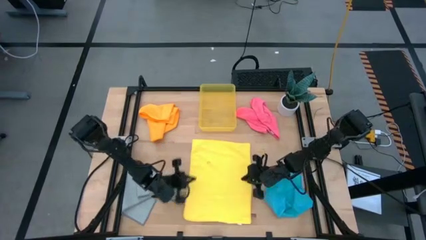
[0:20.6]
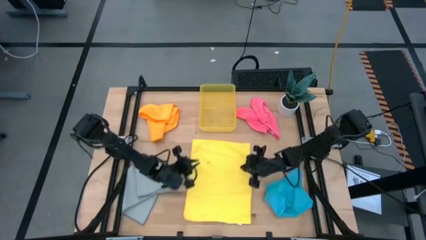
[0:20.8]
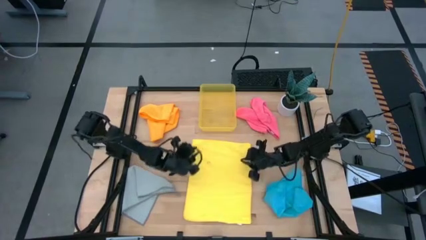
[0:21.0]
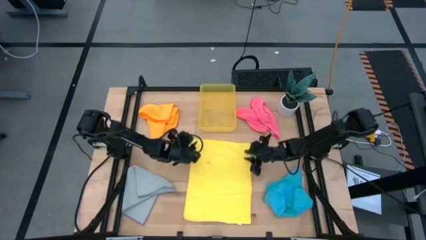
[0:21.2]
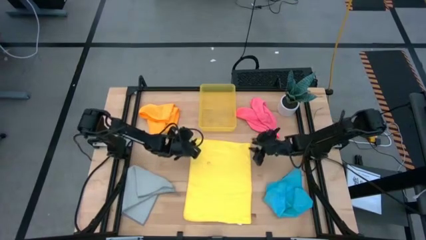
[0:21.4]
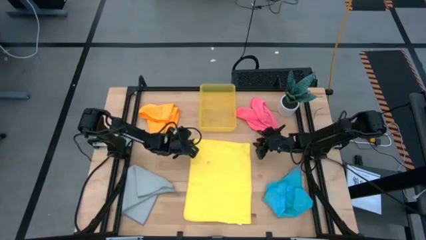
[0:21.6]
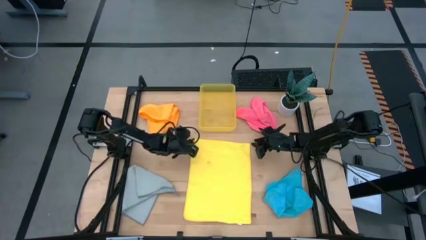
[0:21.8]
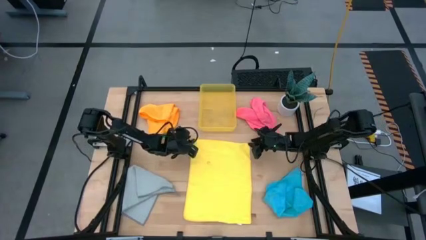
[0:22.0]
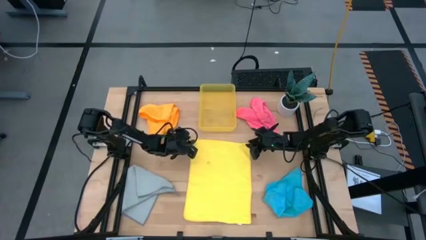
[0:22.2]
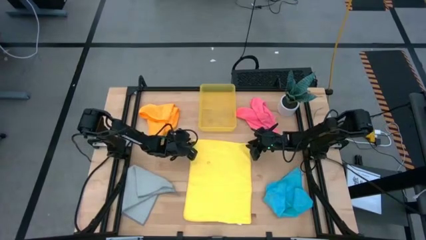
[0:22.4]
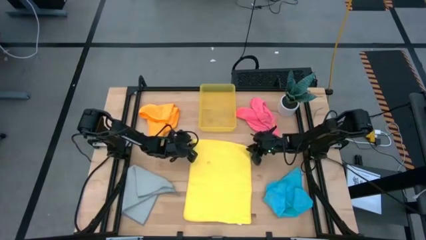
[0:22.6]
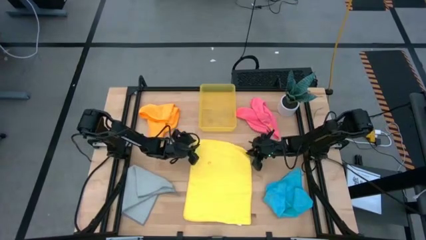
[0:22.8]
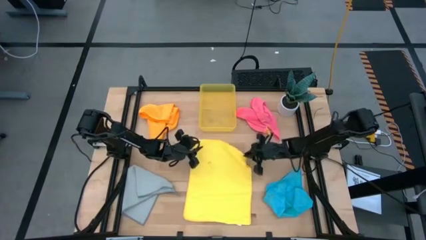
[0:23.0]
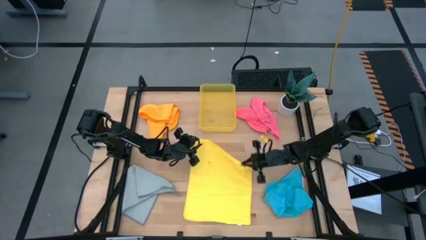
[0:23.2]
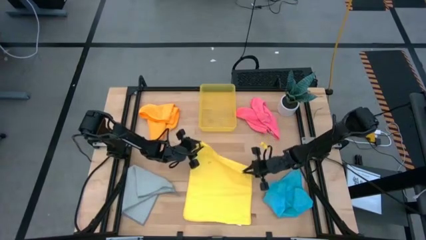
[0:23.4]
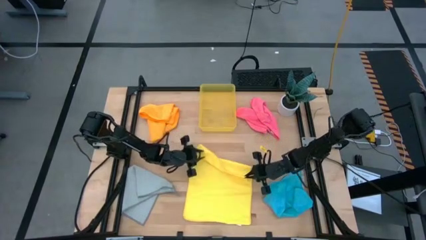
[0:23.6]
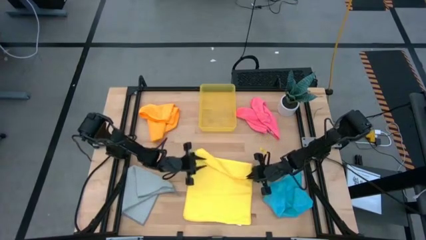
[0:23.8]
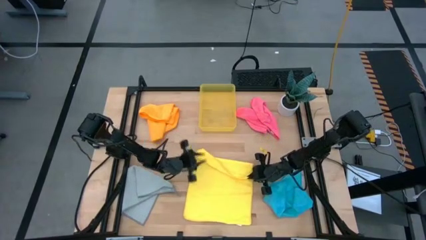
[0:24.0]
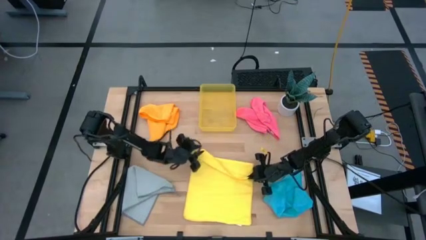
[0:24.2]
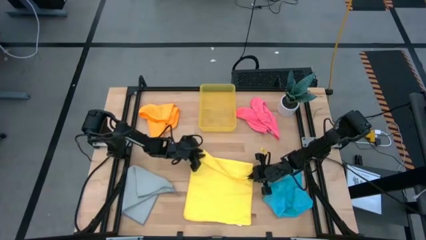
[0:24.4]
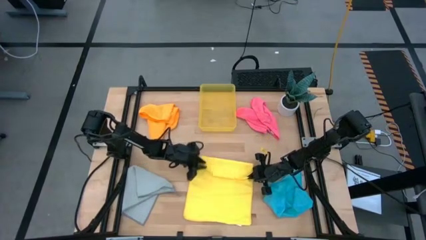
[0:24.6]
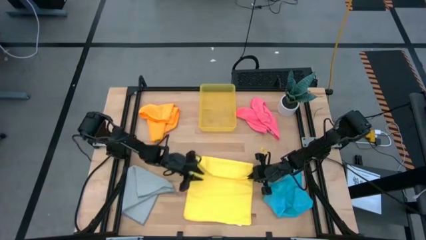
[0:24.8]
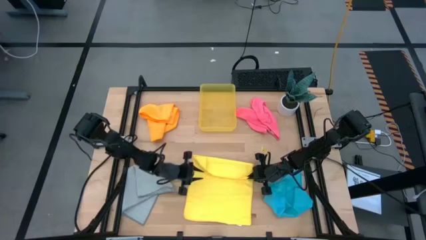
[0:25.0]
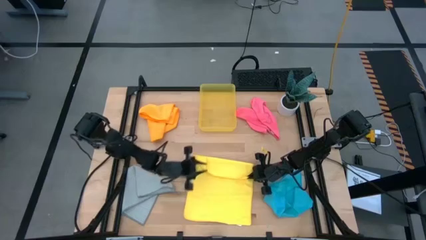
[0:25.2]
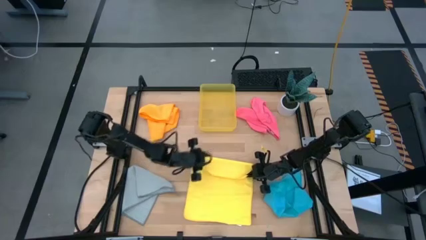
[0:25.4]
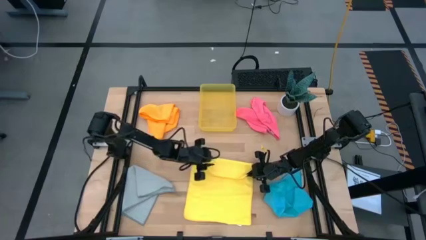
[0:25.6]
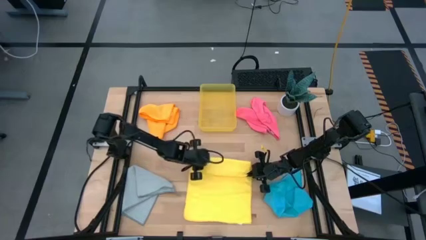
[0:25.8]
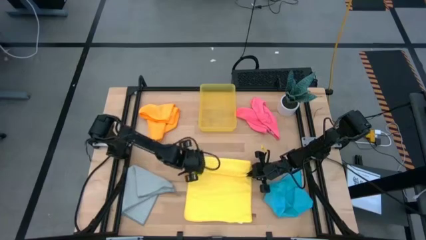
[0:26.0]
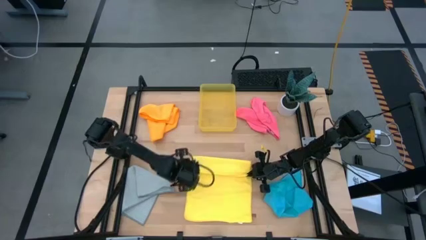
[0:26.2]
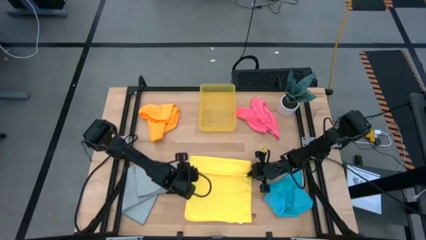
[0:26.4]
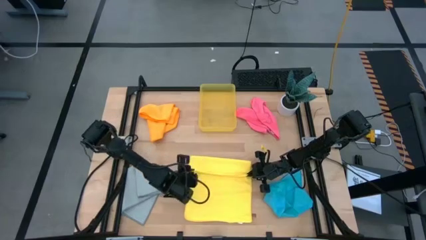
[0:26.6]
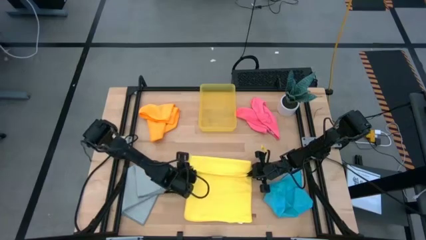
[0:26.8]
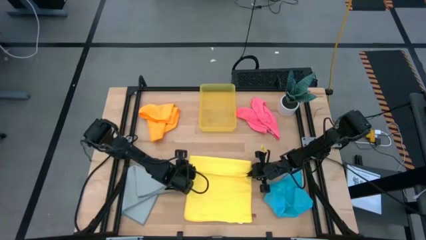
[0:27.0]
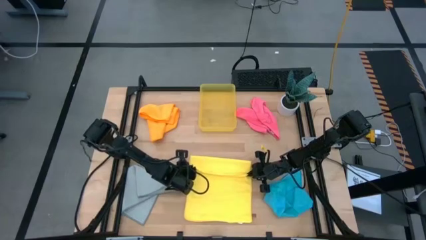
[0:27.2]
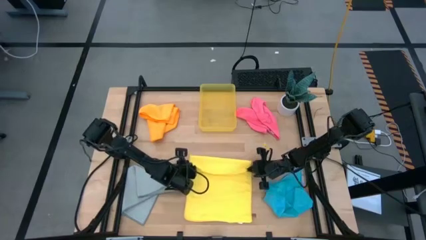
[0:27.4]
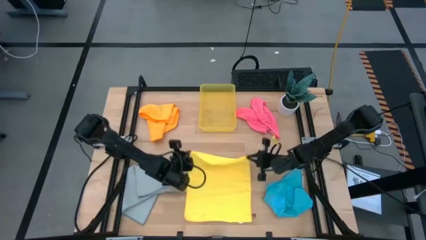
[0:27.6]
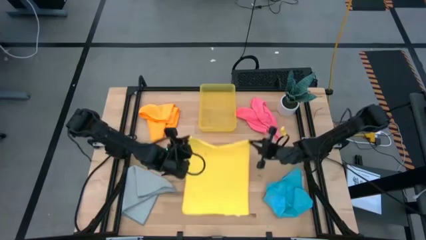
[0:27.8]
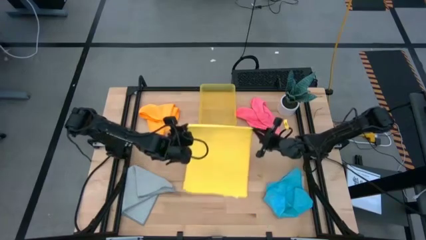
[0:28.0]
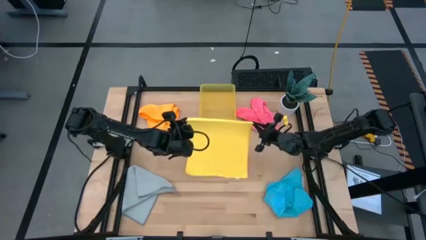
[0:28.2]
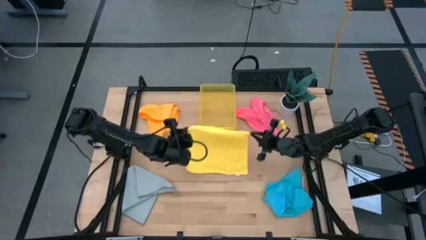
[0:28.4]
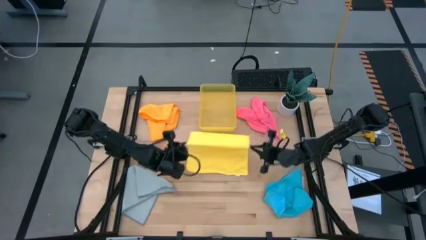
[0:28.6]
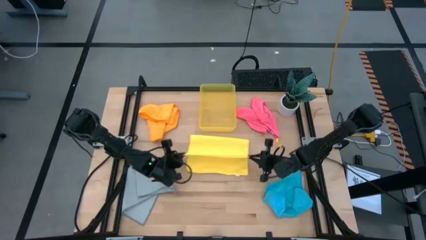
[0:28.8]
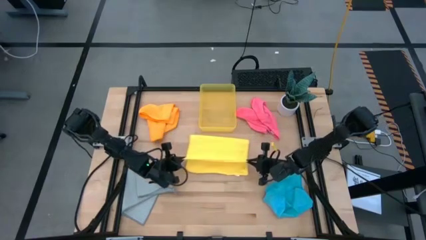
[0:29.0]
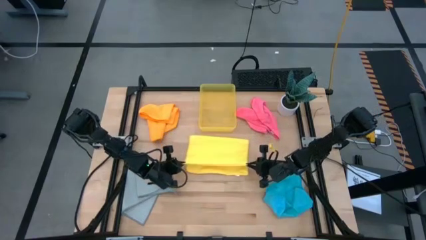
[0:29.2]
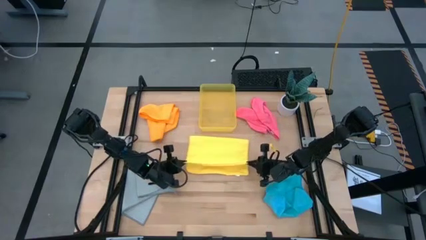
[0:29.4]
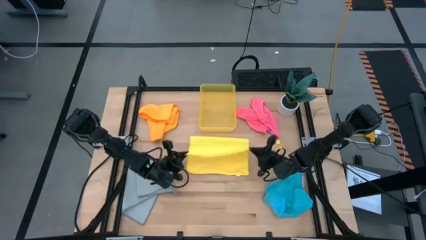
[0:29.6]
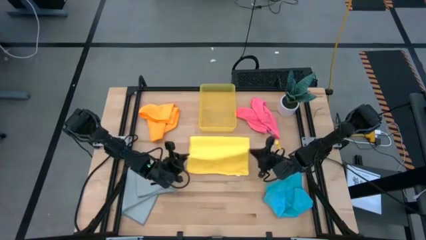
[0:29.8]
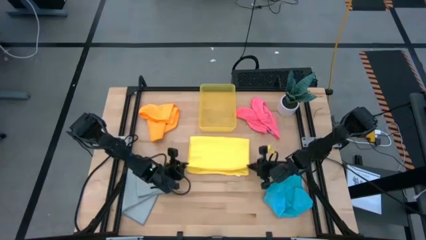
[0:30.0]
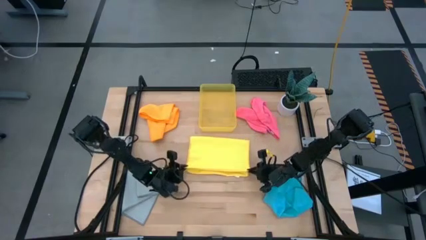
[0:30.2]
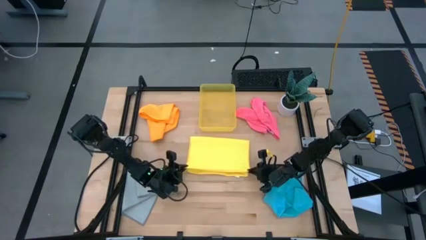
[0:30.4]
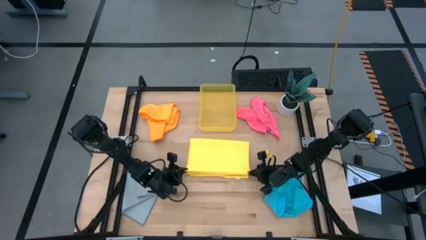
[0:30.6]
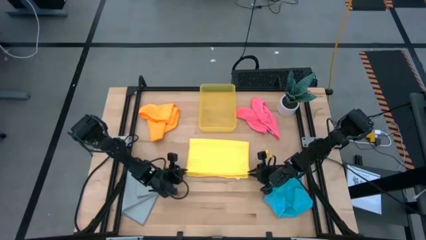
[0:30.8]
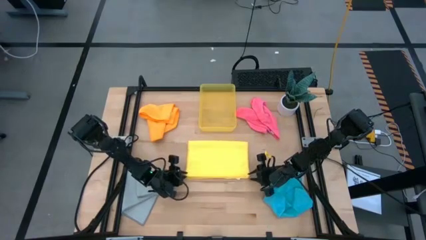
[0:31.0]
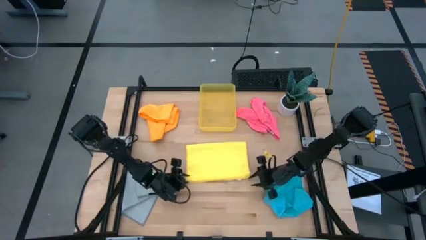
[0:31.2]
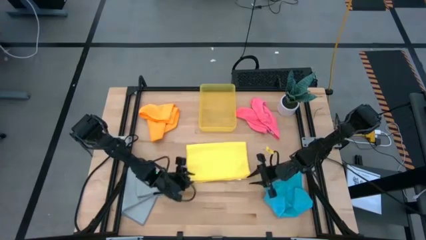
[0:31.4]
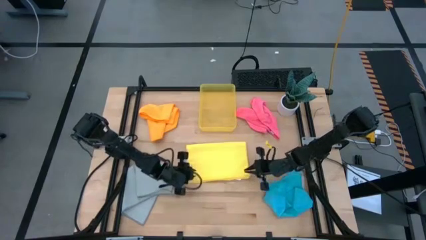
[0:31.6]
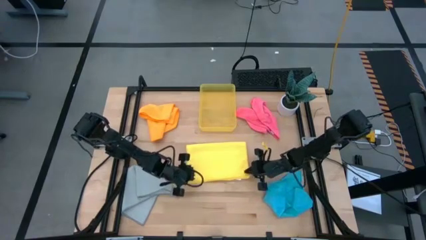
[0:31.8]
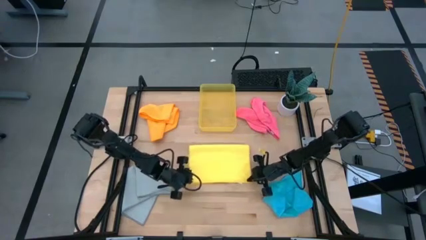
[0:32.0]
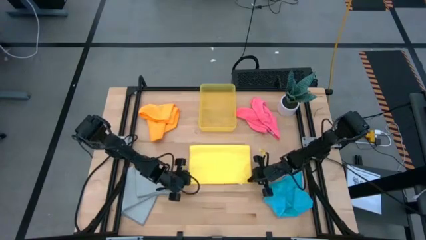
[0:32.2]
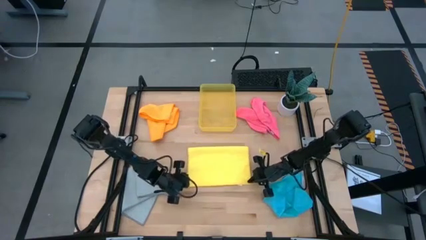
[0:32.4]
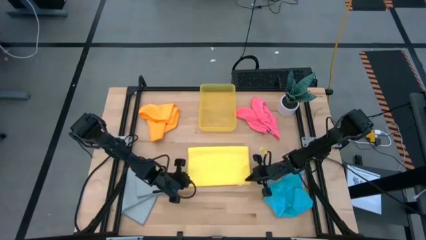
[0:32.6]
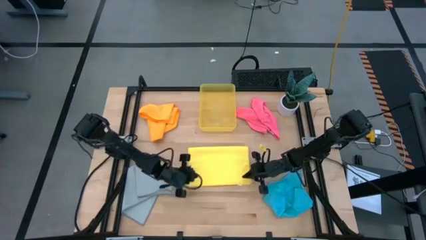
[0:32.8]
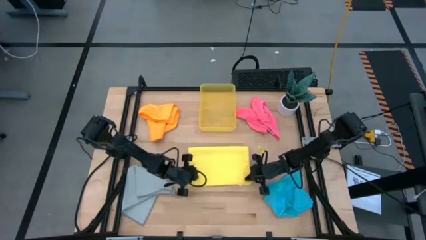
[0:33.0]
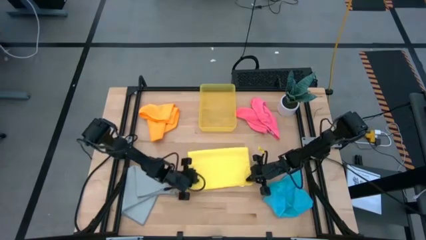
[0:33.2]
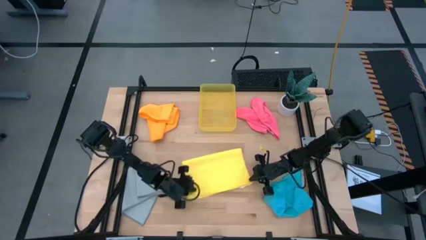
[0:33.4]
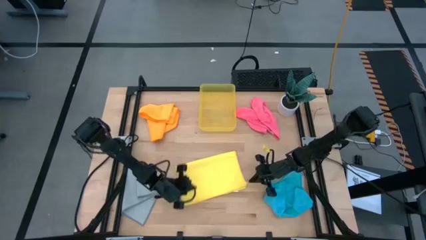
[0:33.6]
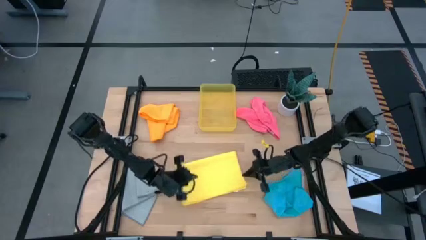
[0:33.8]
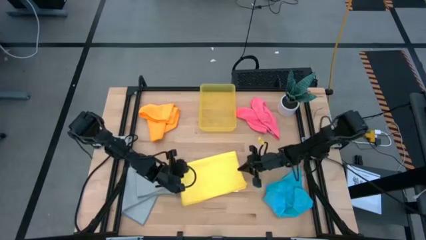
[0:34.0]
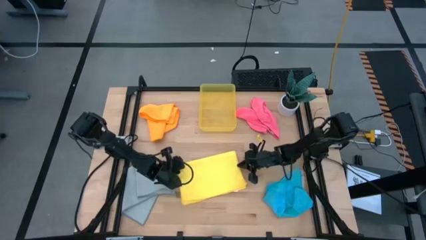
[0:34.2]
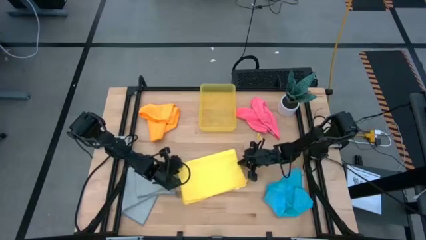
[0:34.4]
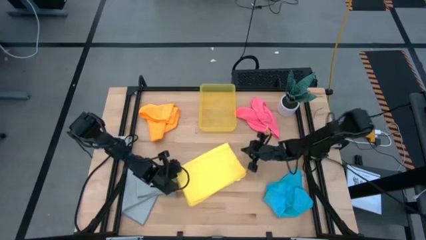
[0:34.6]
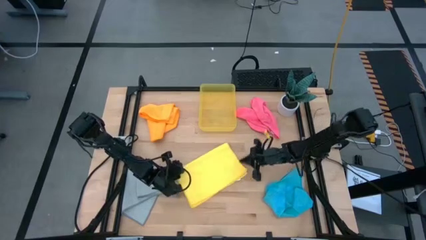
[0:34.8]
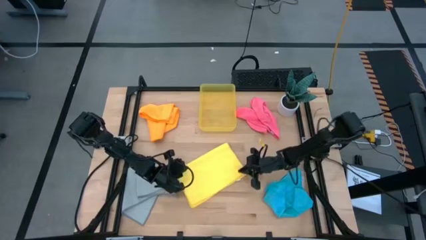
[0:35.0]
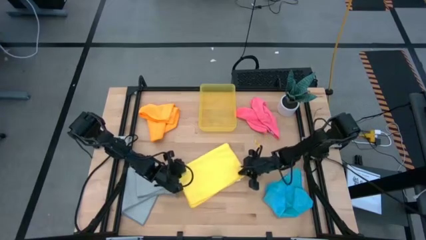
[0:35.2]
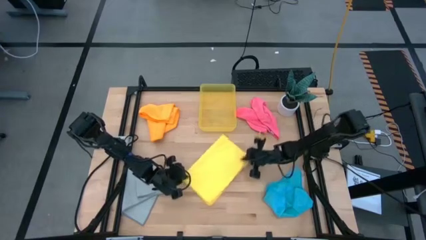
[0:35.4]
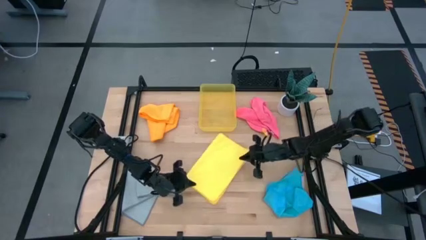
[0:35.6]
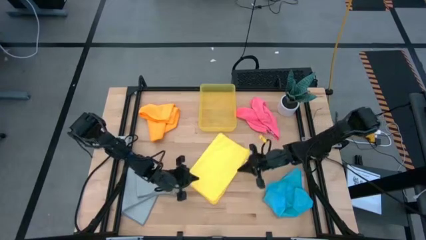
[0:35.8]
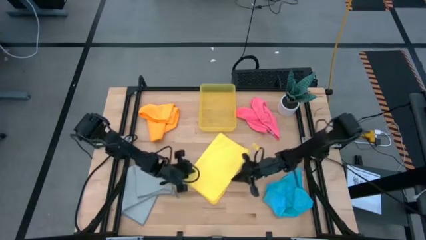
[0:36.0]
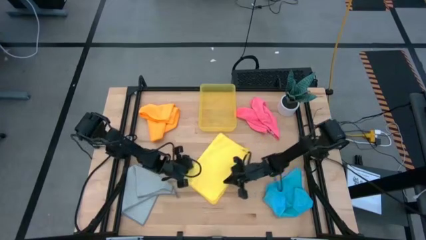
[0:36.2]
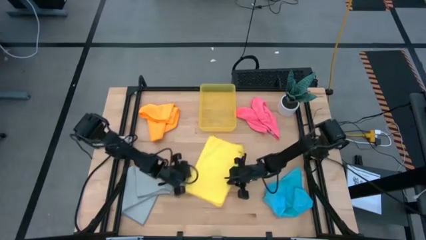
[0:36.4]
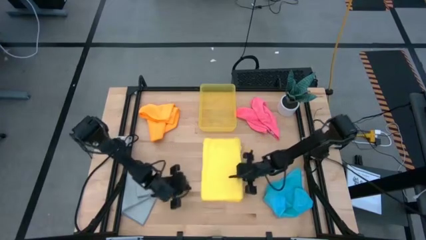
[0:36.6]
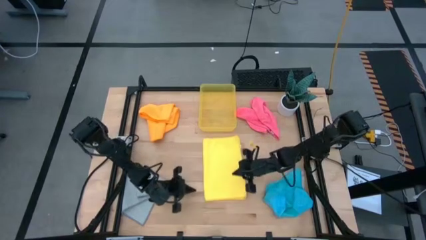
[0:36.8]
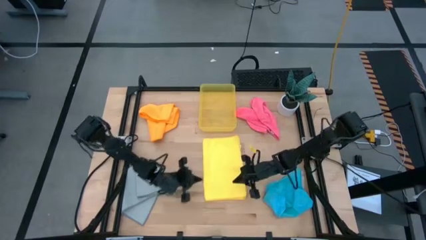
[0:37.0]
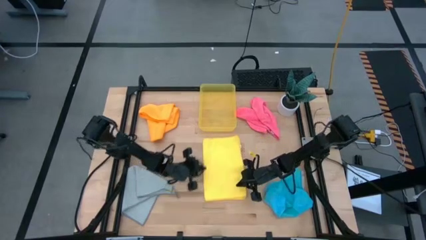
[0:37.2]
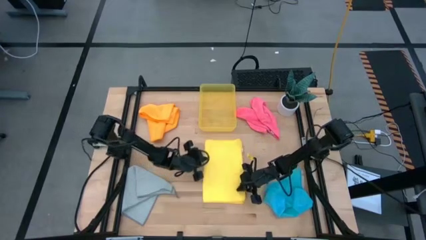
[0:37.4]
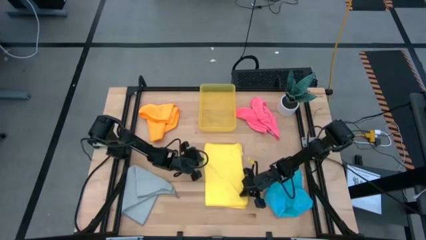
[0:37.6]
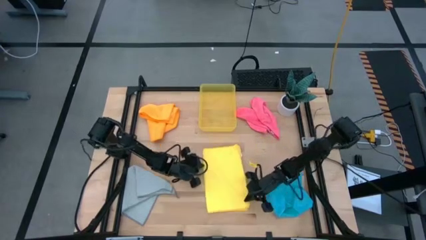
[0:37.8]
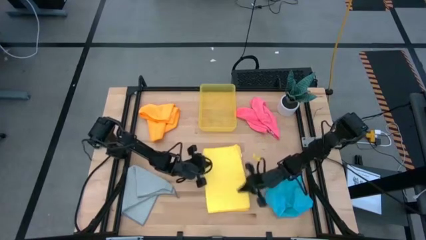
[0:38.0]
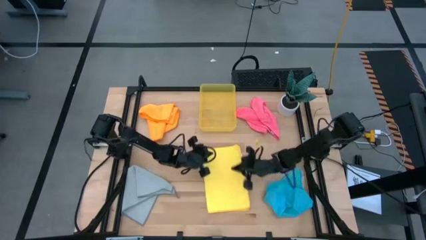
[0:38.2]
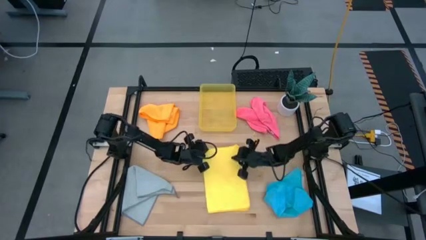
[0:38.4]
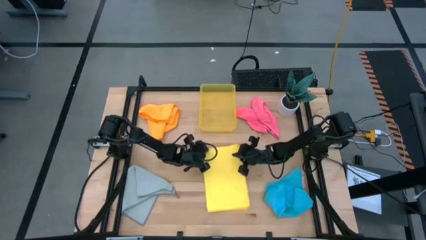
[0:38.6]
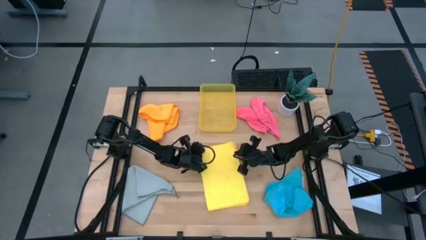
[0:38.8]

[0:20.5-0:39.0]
Task: Fold microfiber towels
Fold the yellow microfiber towel
